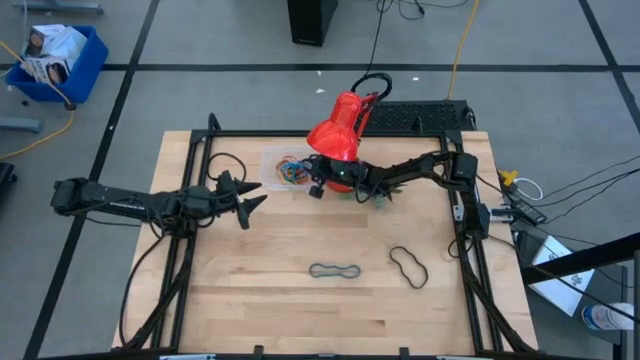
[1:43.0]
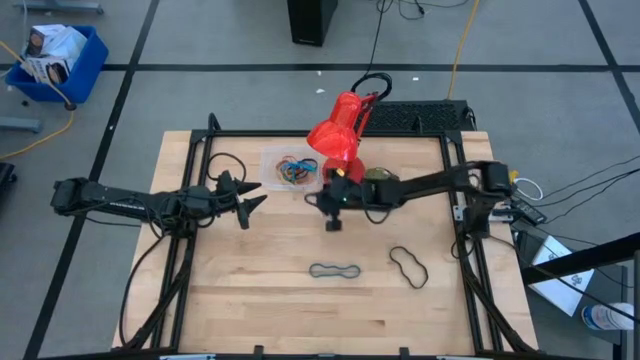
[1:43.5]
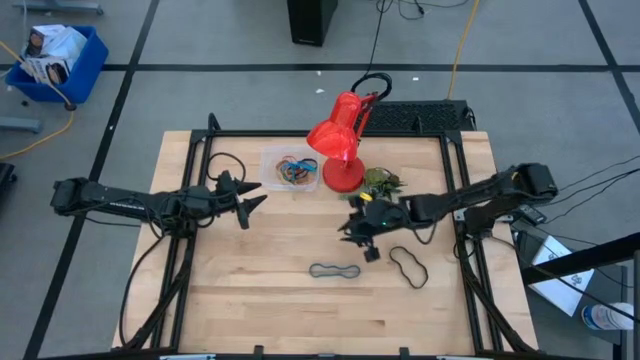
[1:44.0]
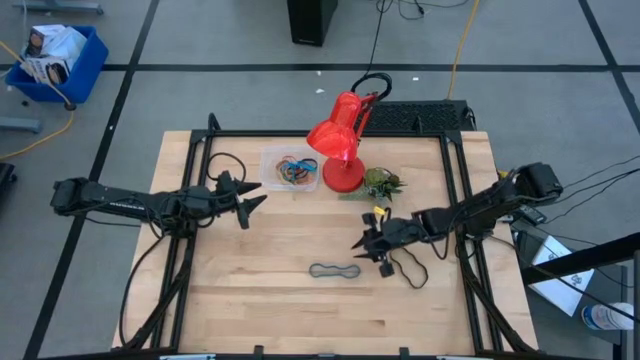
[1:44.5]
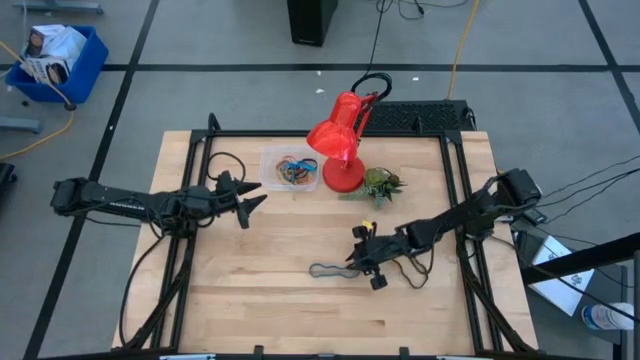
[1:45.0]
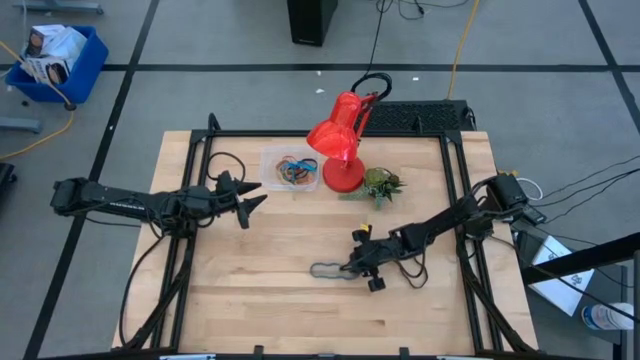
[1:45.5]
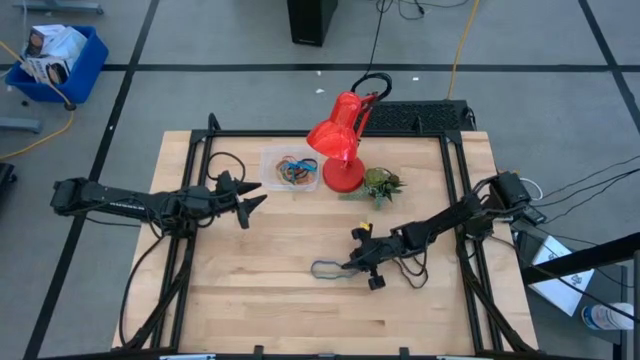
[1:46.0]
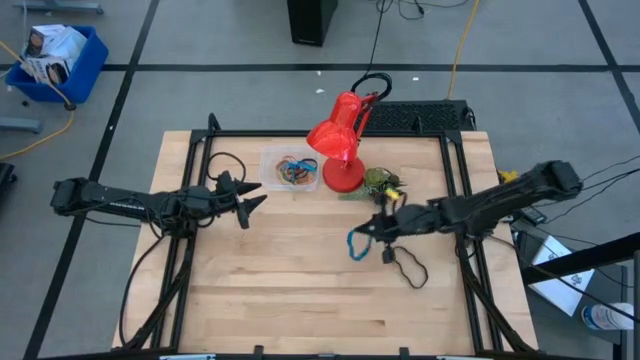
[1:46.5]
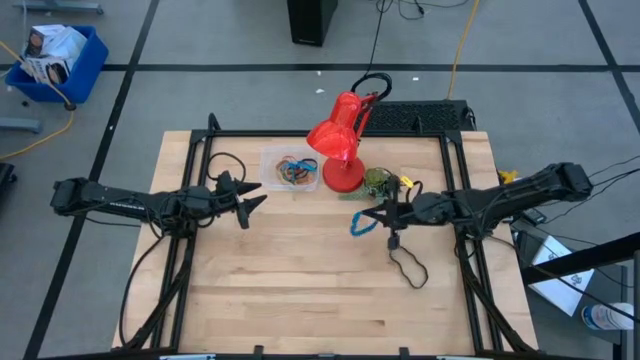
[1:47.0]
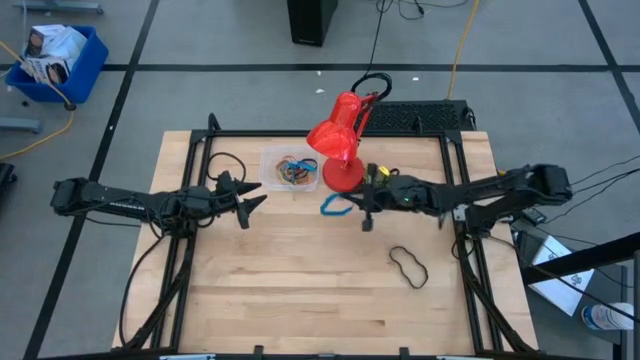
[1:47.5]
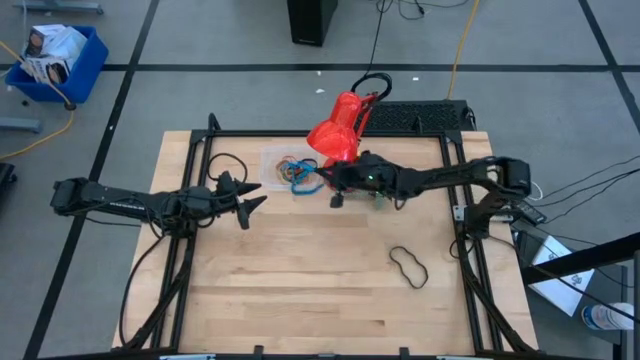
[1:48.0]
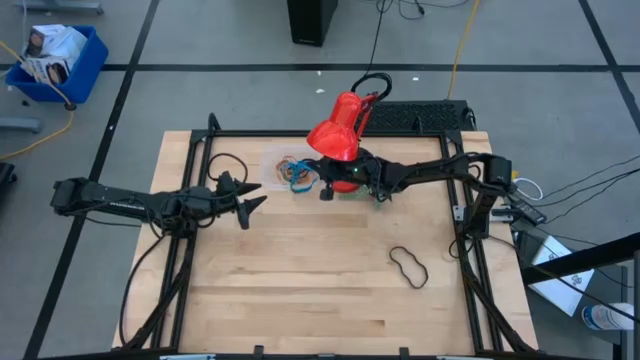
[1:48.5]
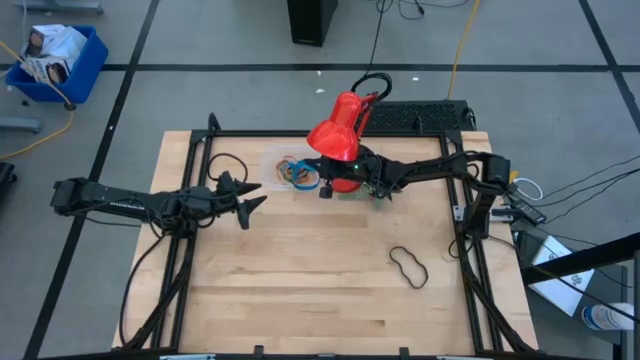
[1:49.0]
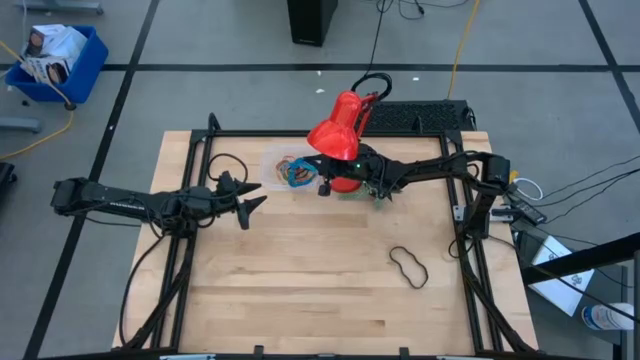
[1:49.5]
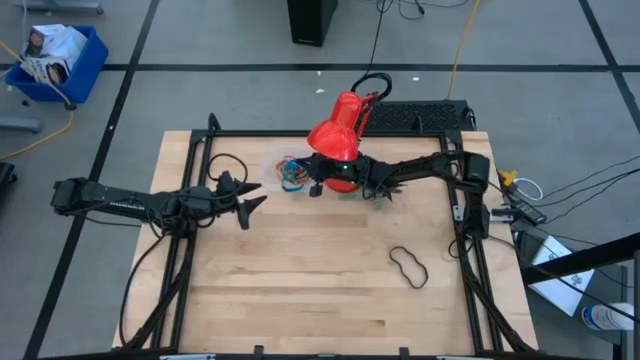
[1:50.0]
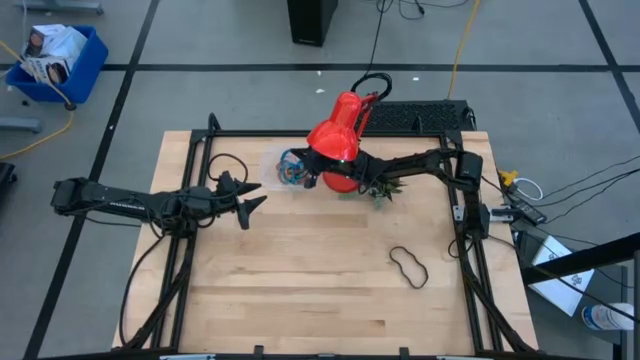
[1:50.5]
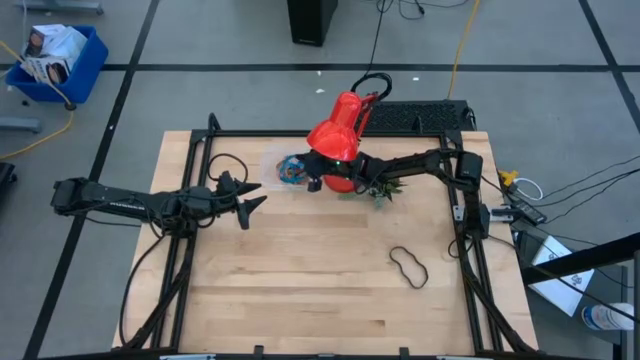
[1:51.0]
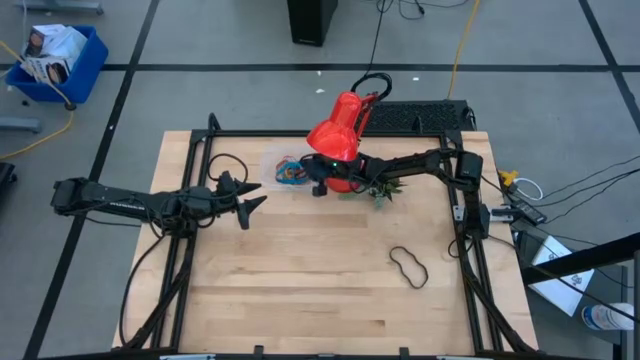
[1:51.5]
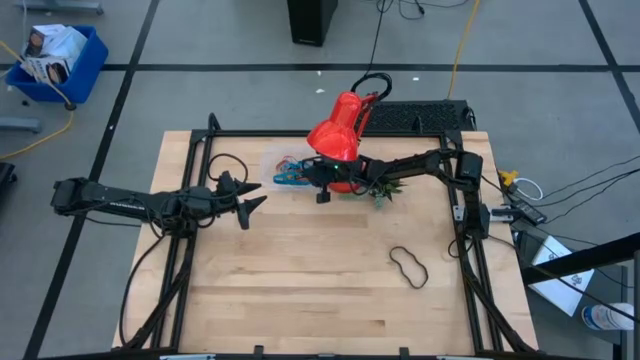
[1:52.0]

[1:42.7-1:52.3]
Task: Pick and place rubber bands into bin
Put the blue rubber band into the transparent bin

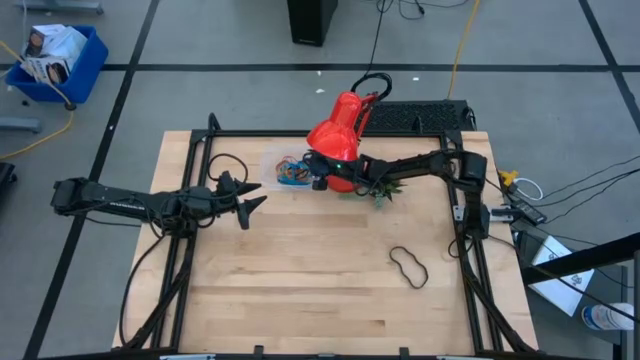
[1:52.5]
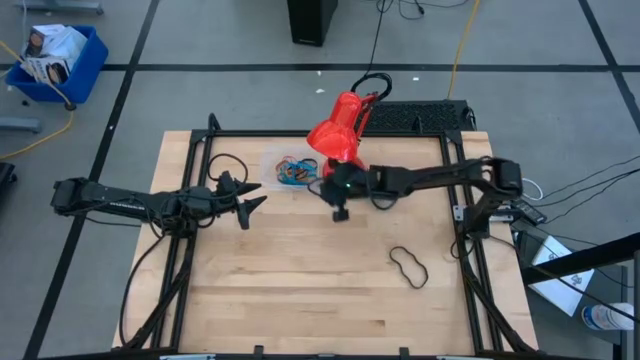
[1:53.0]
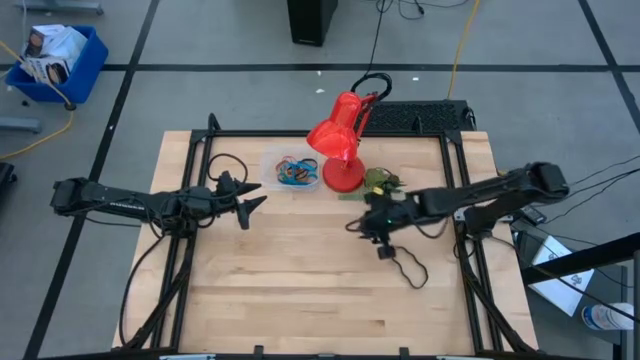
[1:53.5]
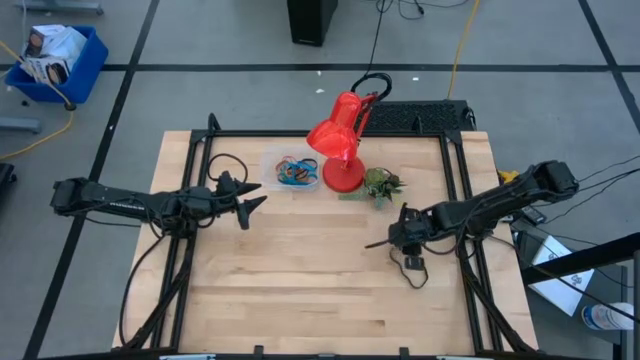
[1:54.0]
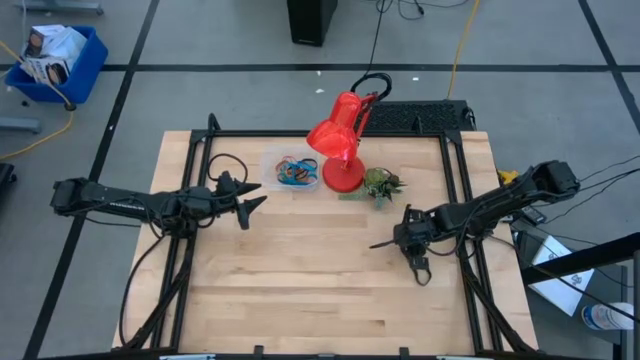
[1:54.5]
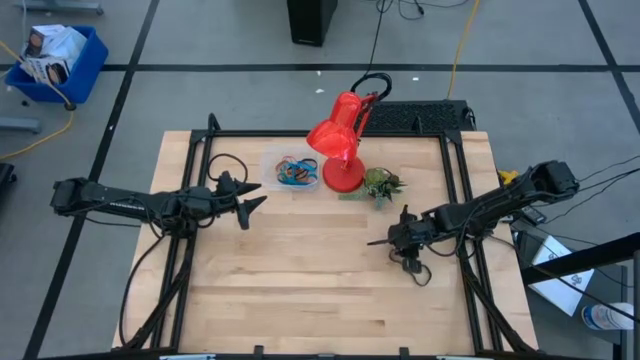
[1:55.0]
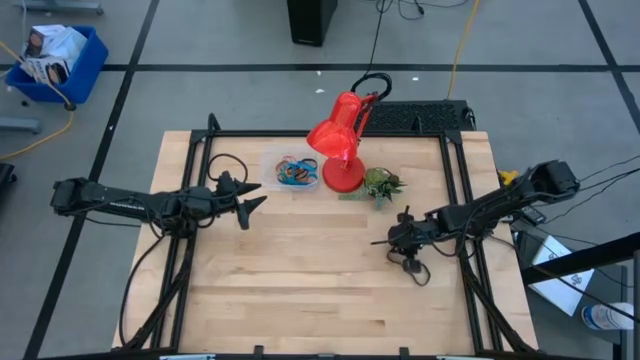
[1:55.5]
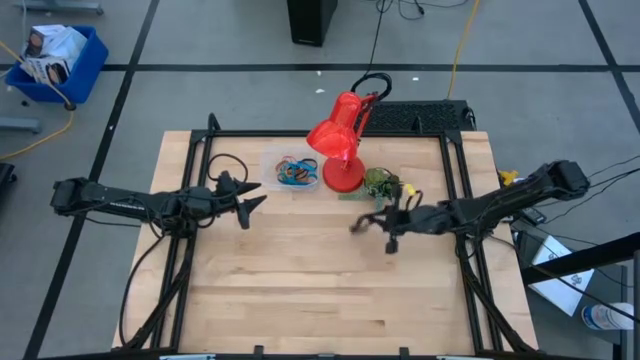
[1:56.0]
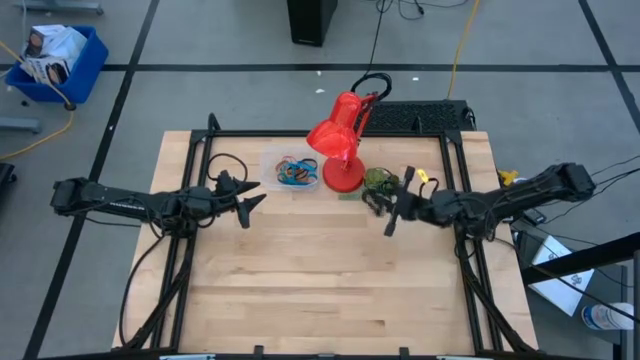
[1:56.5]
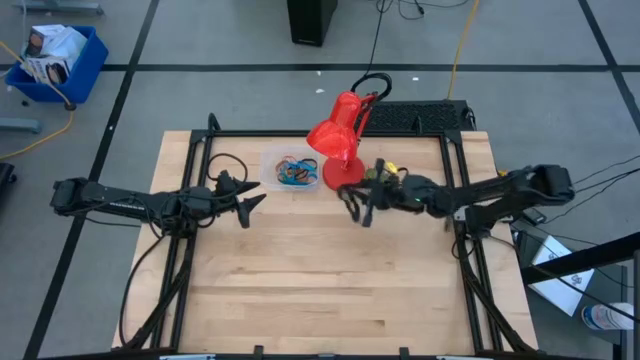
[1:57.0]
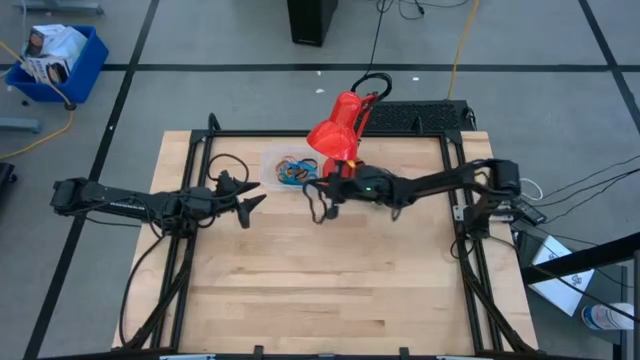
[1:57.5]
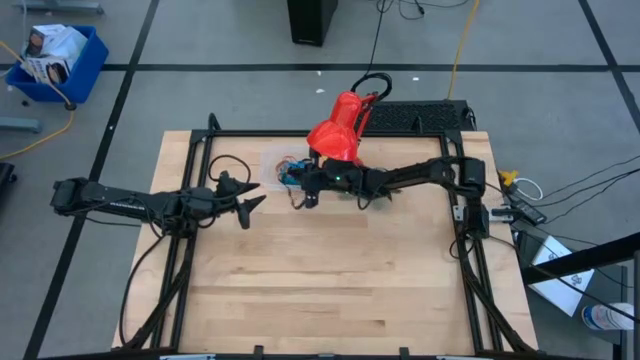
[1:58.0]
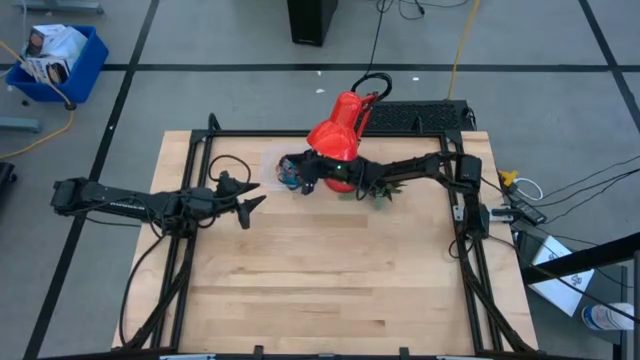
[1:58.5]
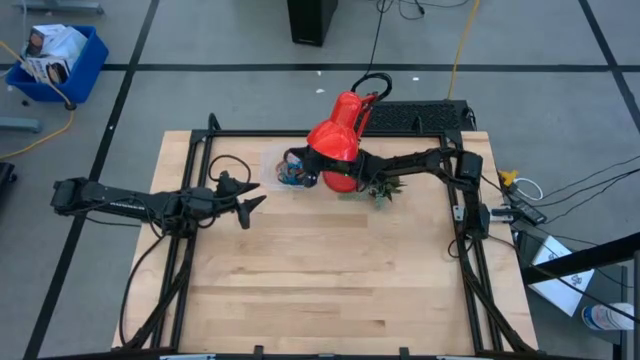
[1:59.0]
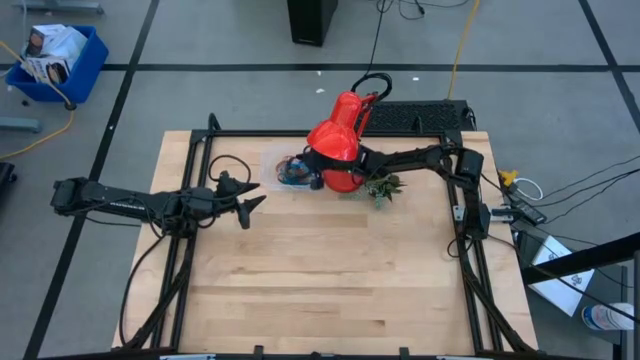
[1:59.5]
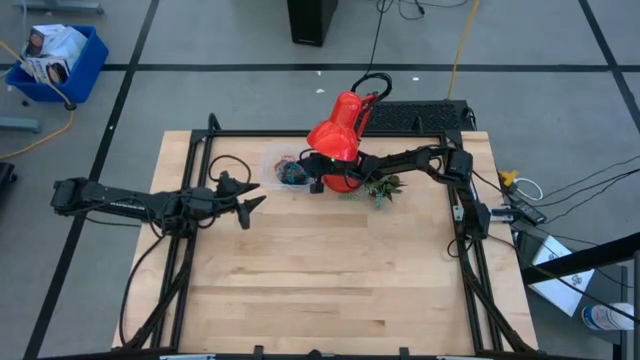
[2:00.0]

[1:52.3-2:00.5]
Put the black rubber band into the transparent bin

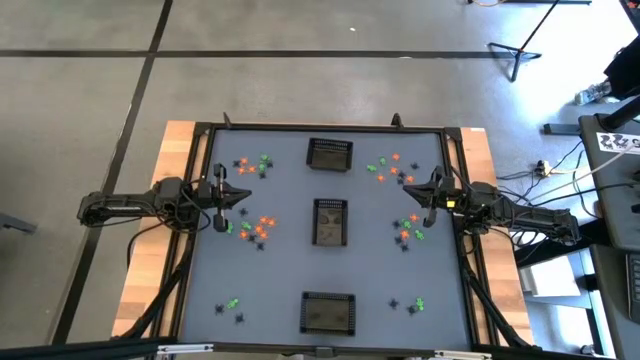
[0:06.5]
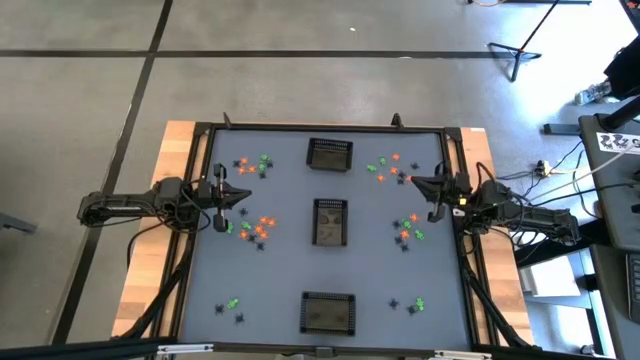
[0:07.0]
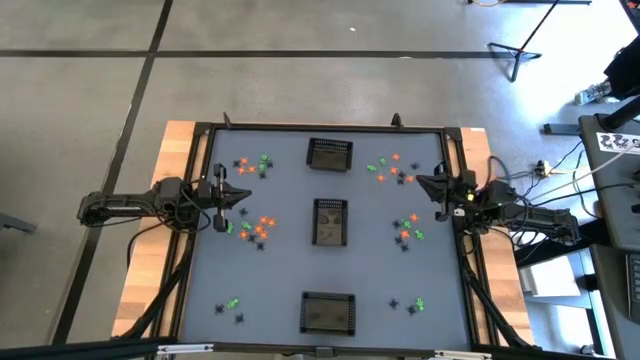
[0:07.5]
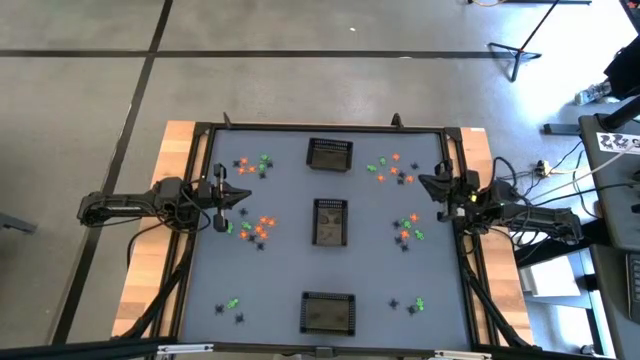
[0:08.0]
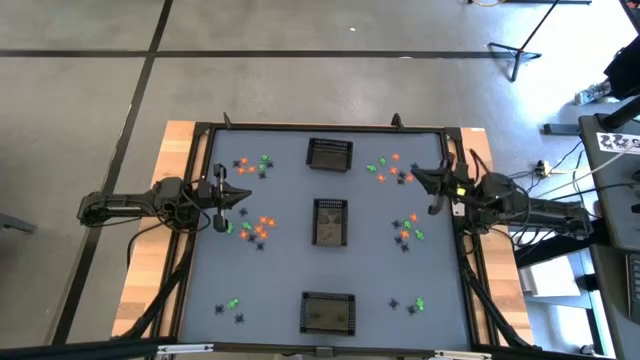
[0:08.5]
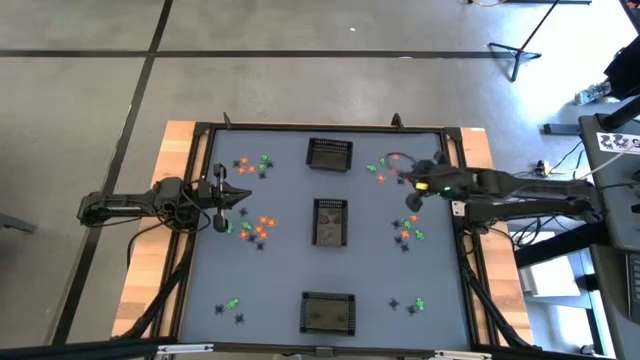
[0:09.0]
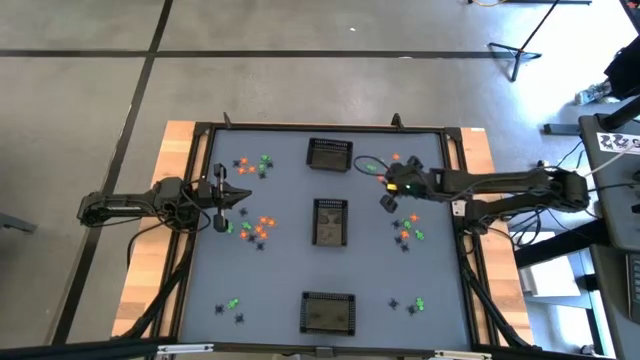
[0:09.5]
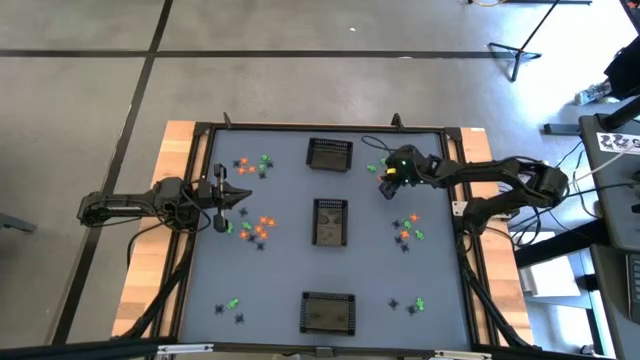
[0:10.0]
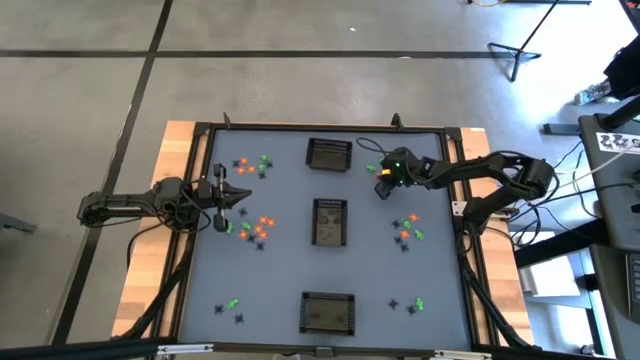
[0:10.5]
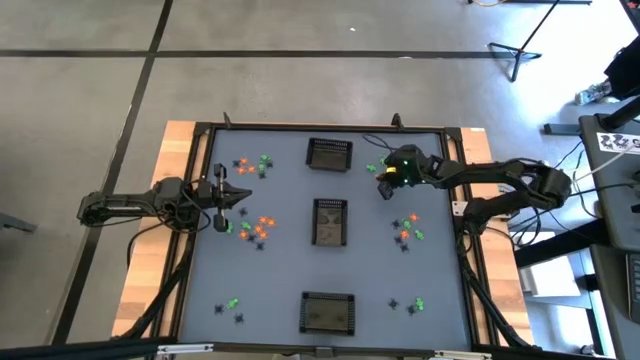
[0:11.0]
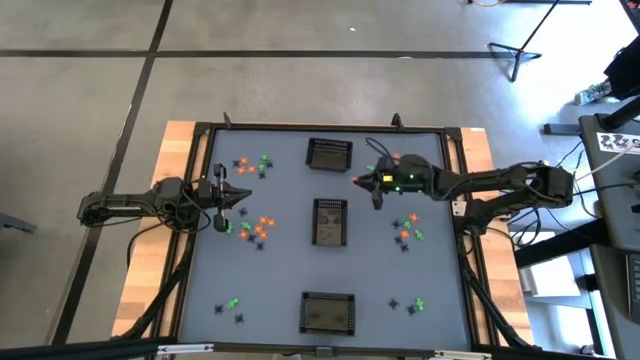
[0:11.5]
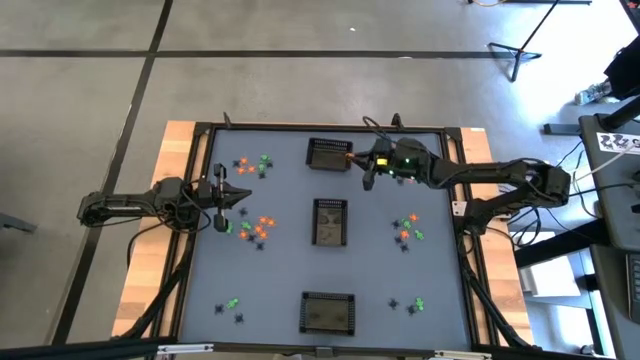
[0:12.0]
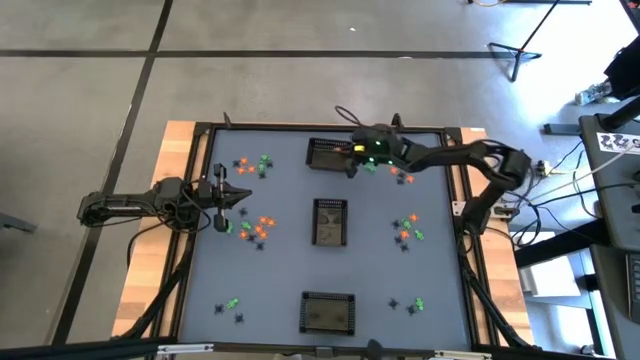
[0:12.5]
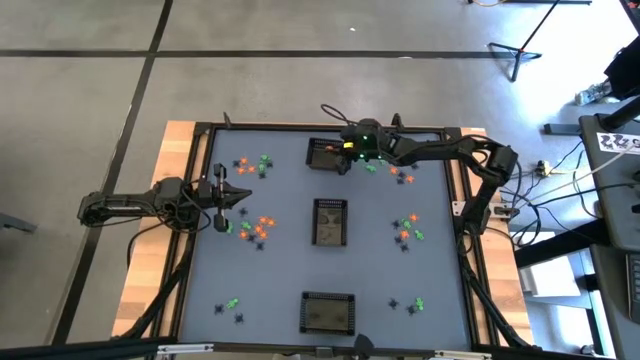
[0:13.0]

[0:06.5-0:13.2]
Task: Sort Halloween decoration
Put the orange spider toy into the top black bin
